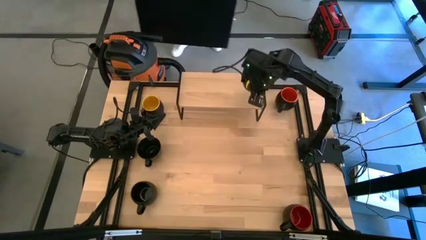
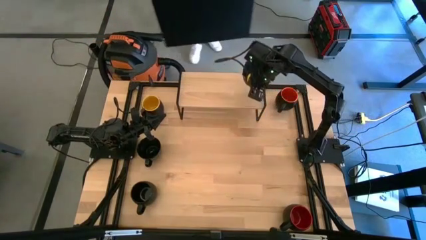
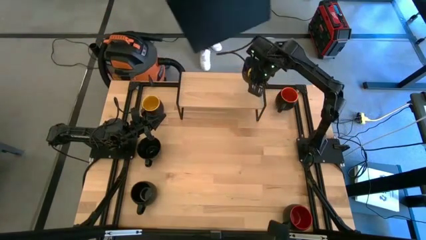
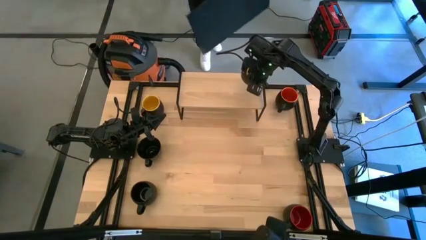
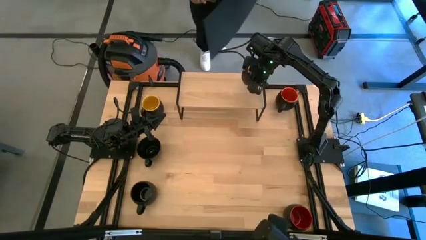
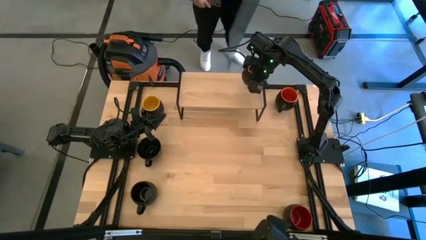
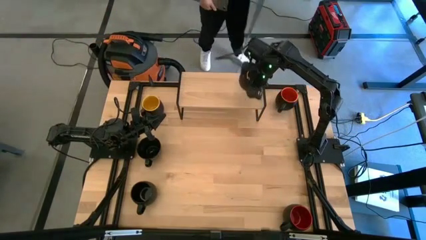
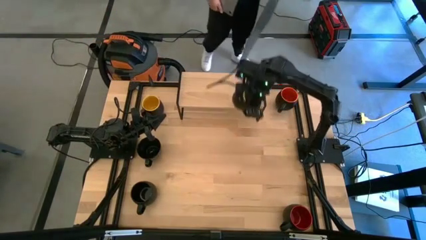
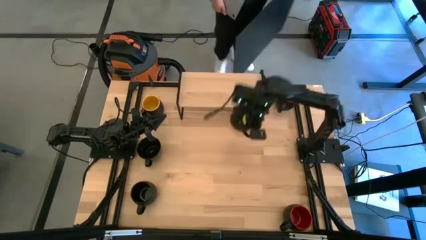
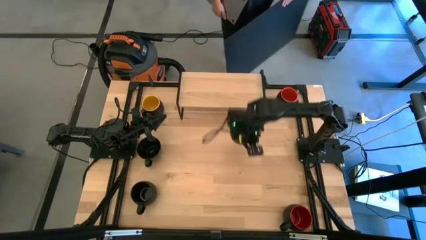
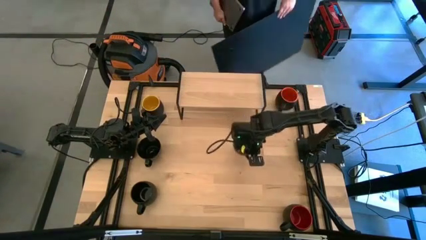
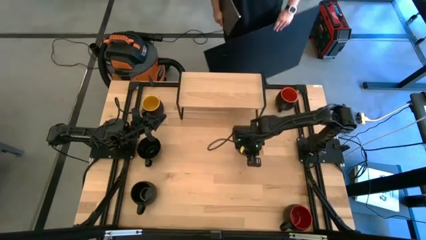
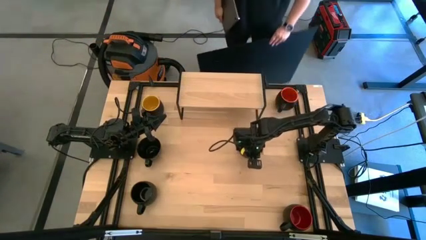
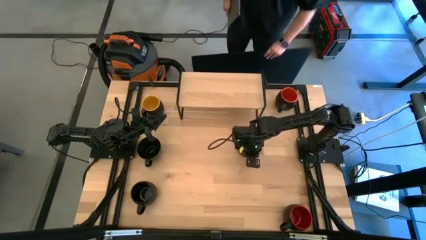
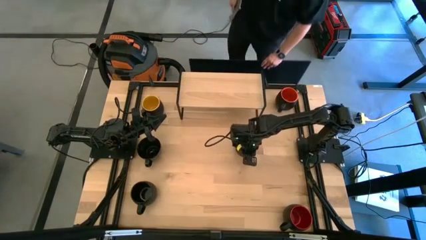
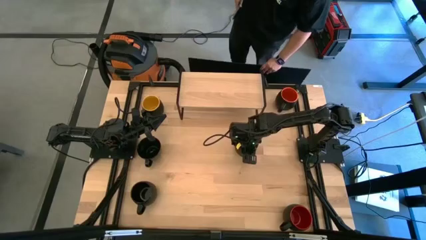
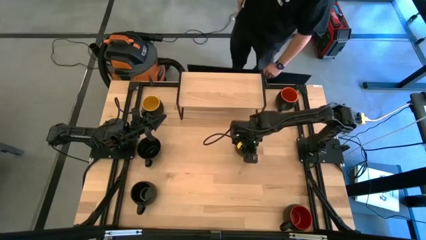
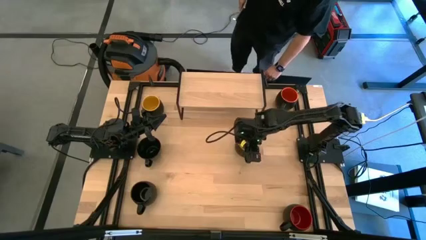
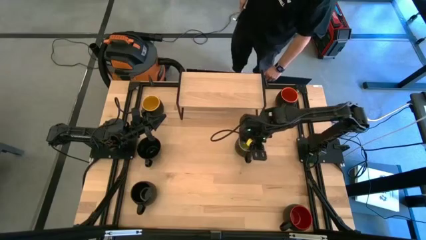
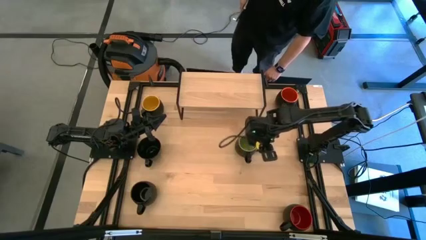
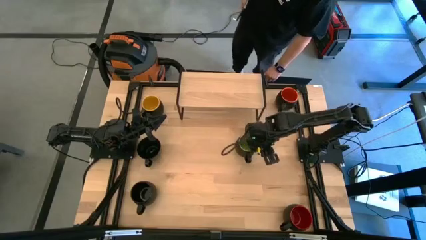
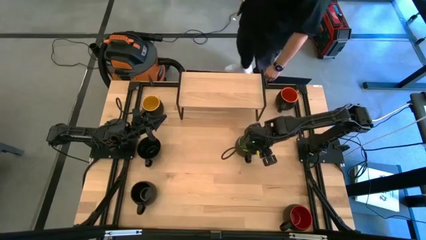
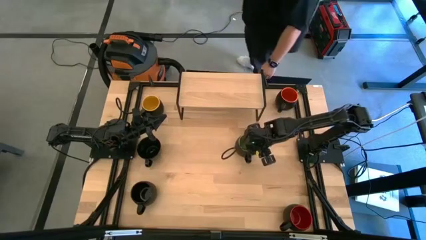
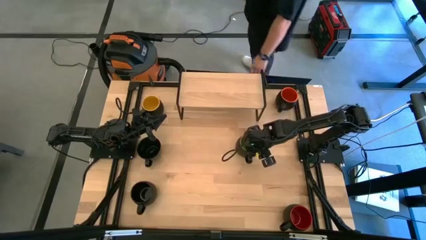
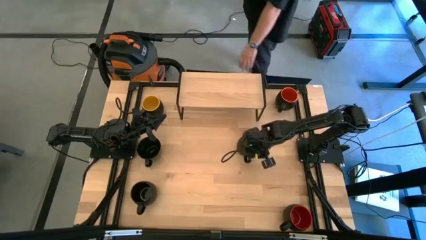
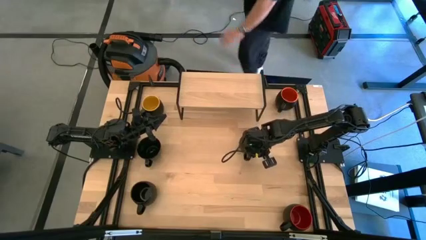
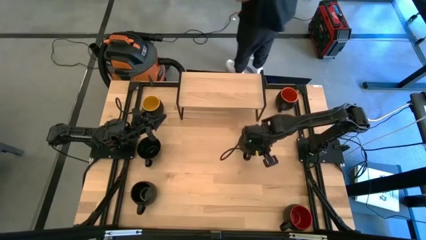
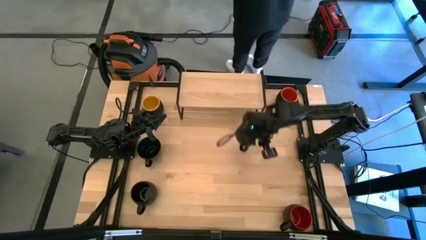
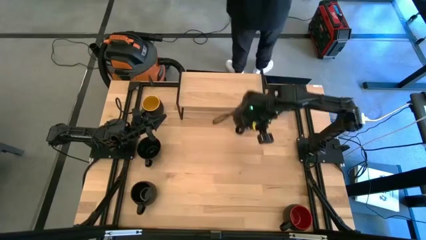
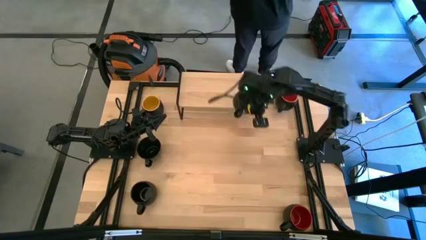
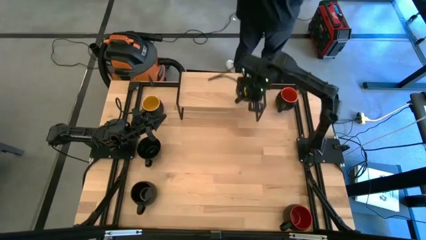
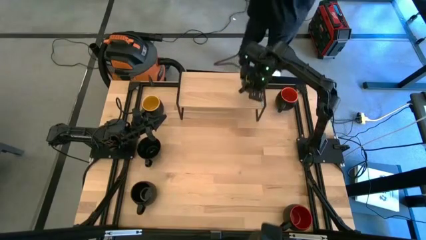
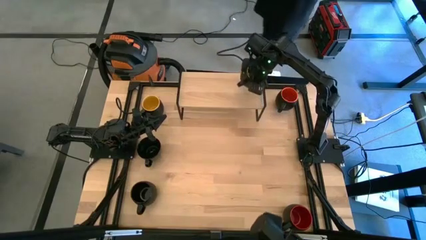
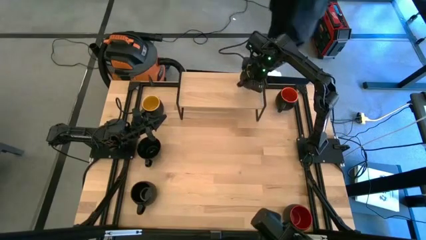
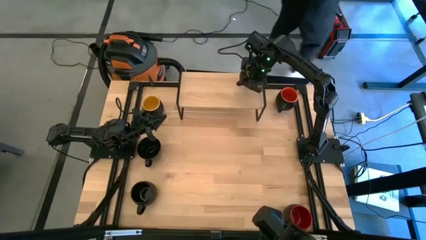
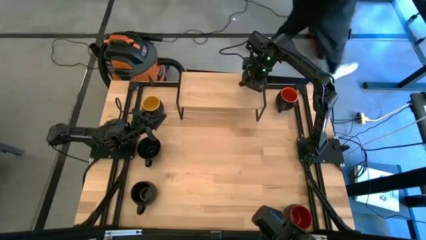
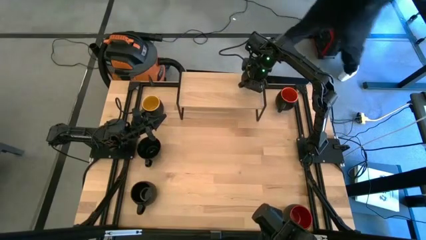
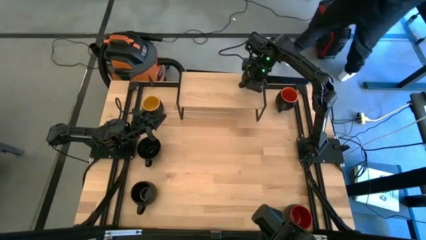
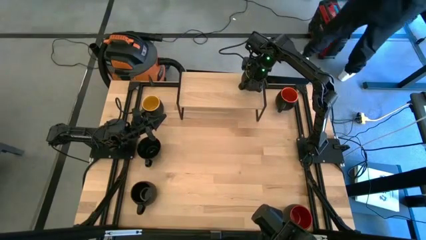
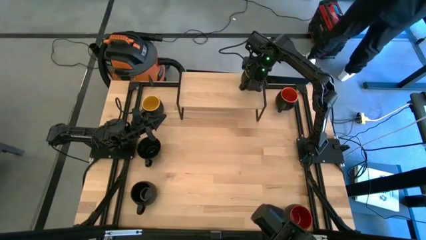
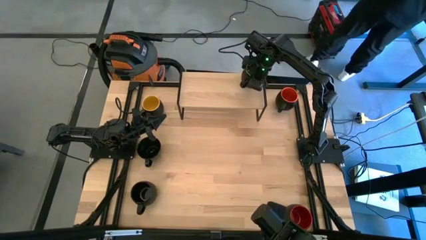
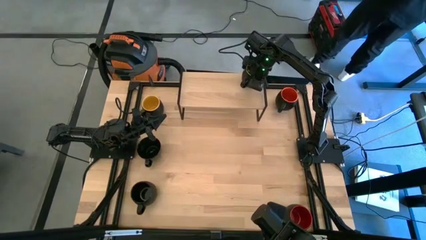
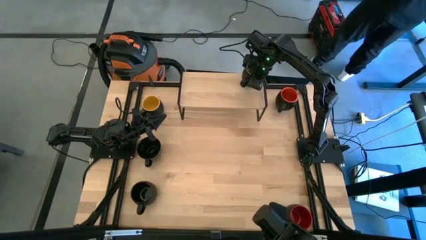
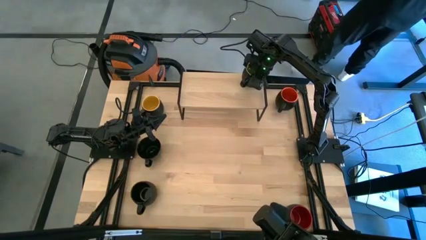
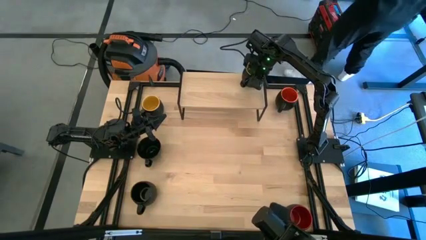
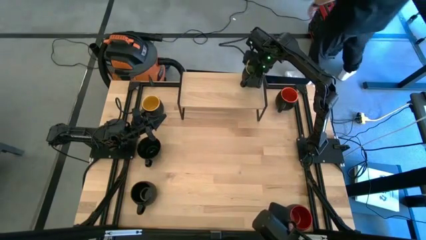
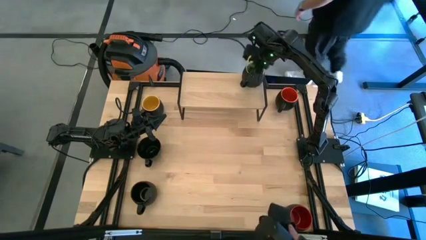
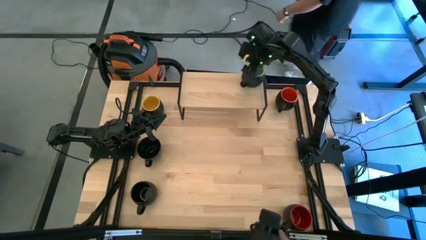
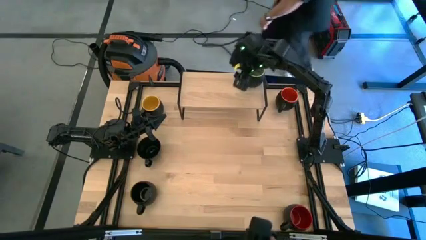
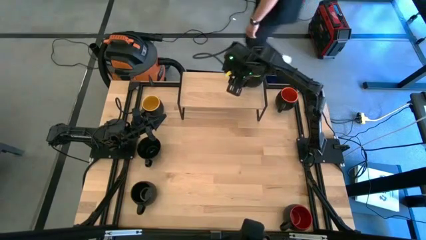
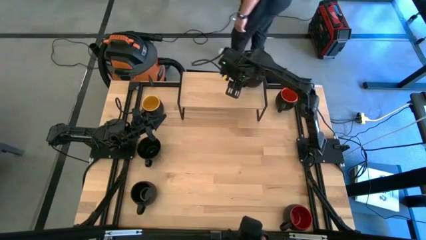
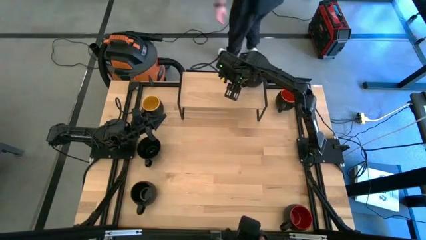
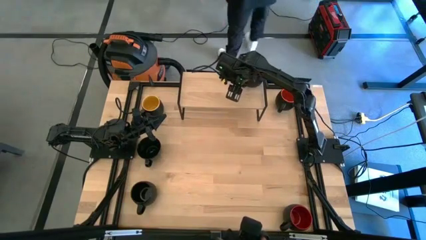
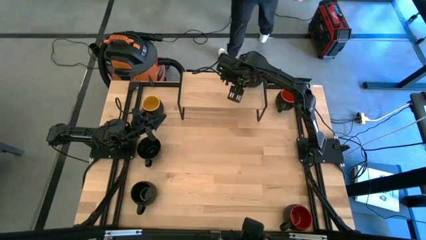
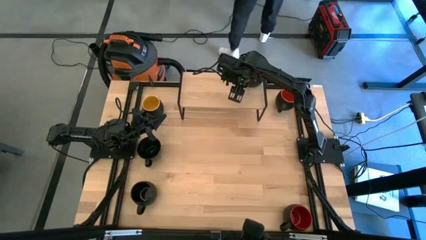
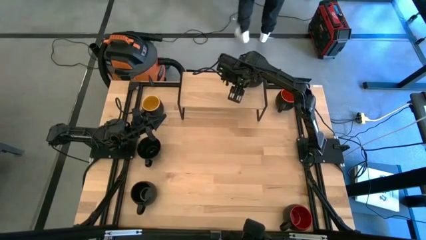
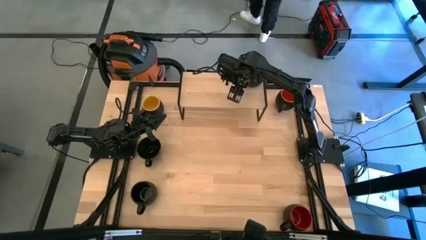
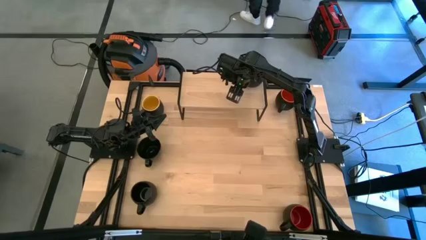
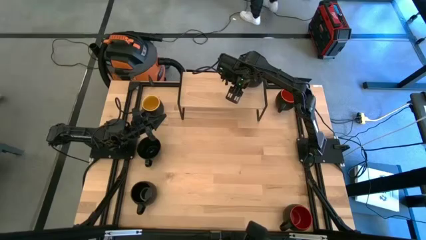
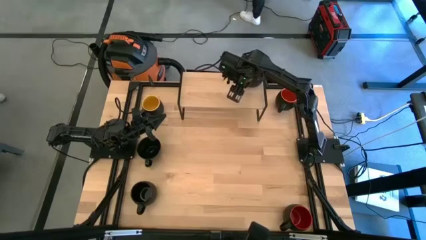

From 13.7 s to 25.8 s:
Task: Place coffee mugs
Put the green mug on the shelf

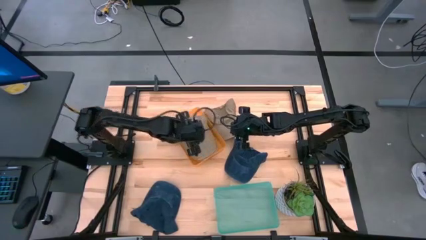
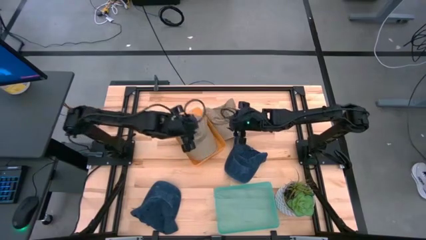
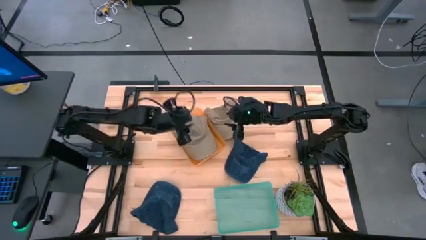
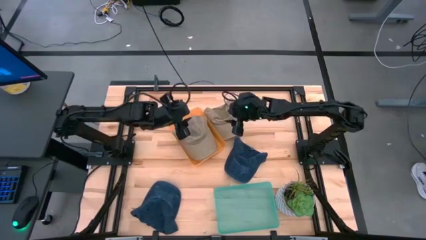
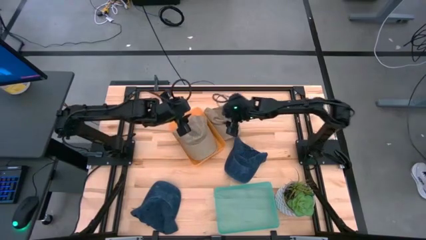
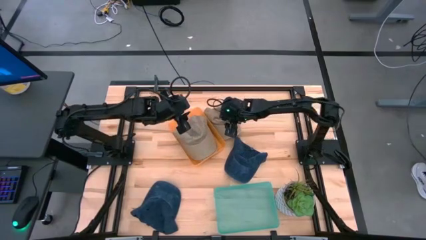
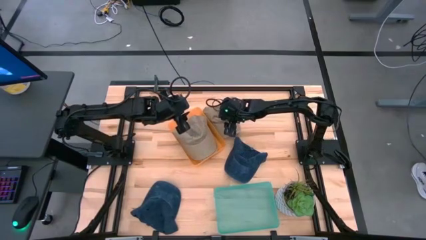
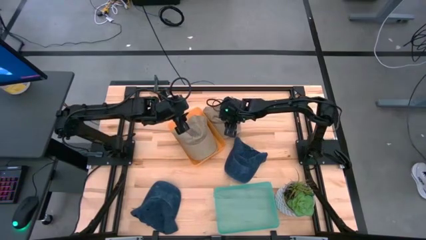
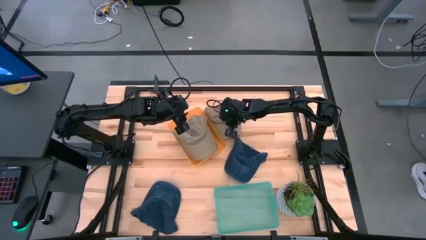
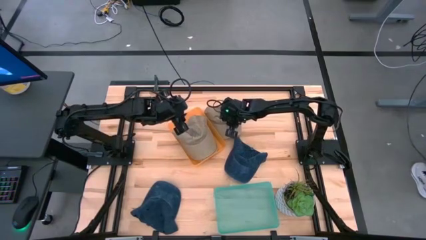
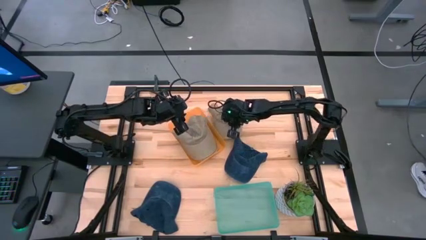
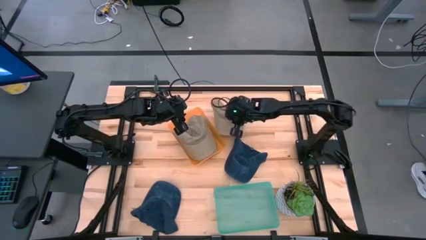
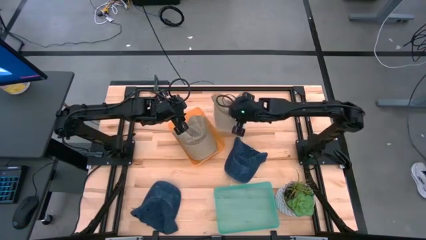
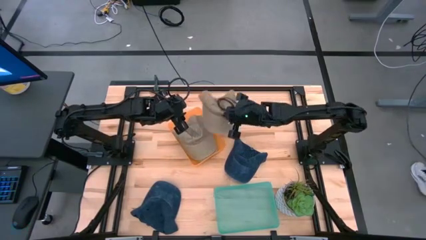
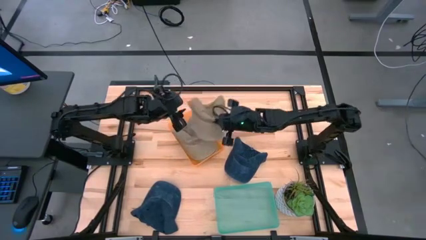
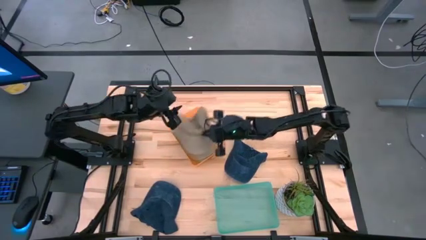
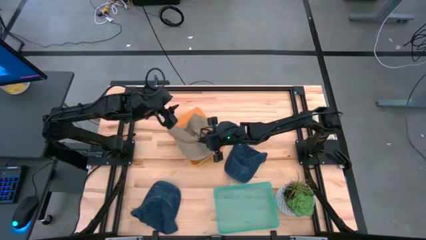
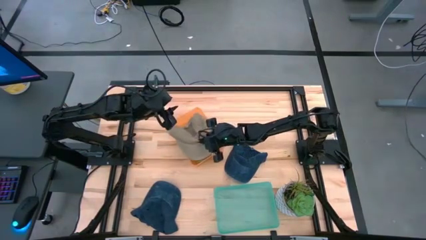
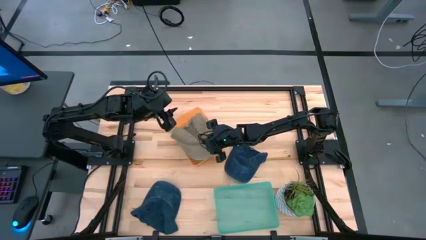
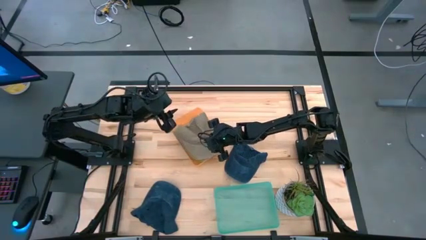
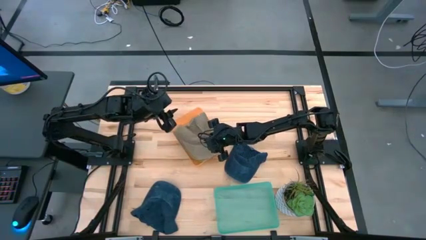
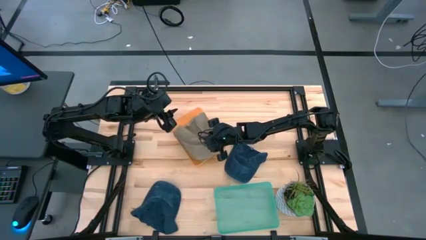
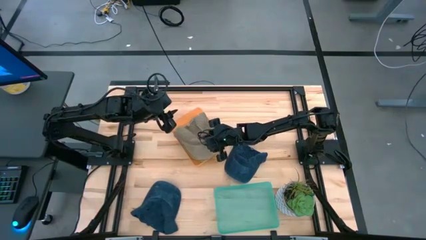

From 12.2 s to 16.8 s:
Task: Pick & Place hat
Put the brown cap into the orange bin
